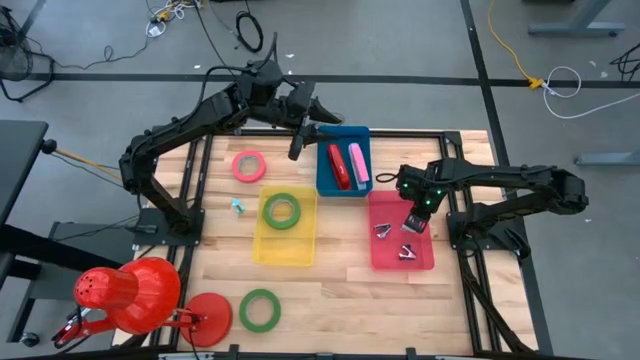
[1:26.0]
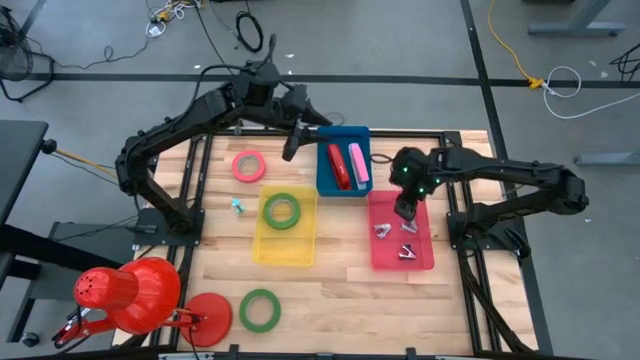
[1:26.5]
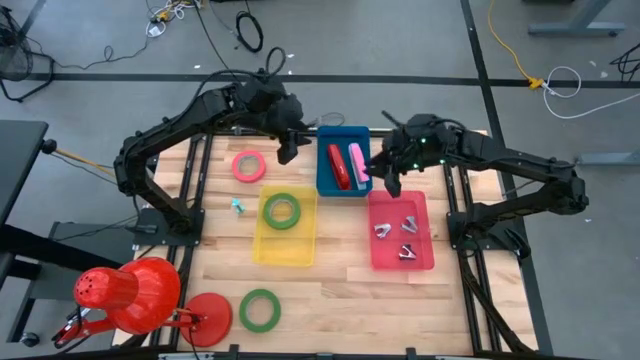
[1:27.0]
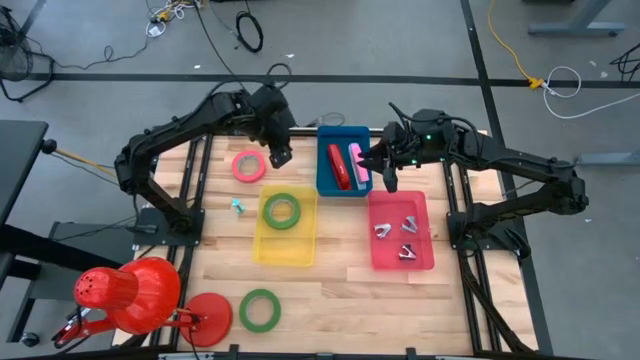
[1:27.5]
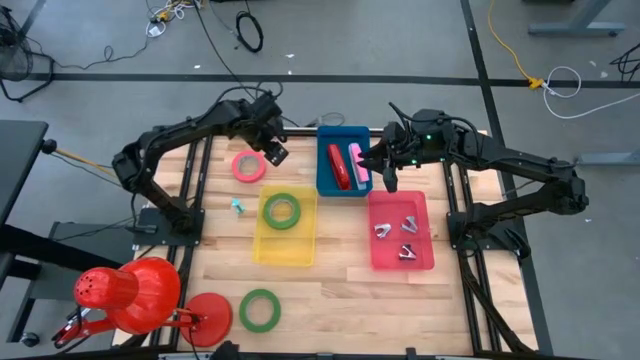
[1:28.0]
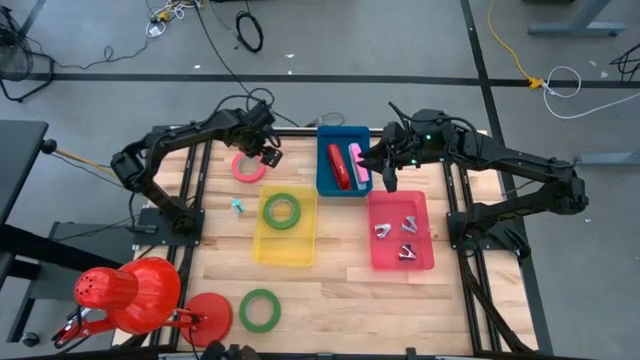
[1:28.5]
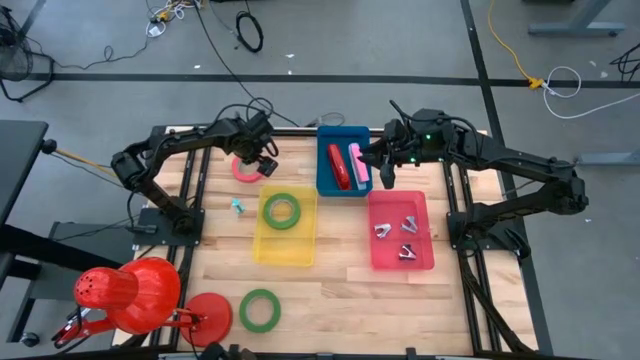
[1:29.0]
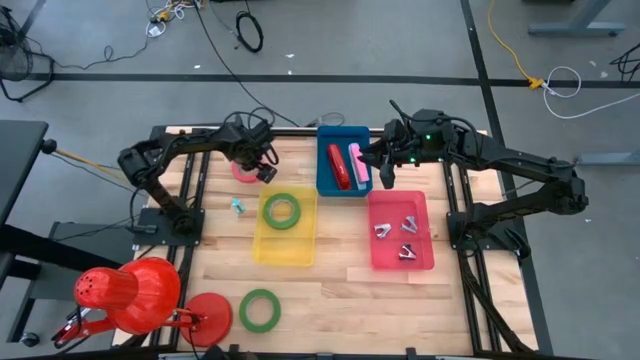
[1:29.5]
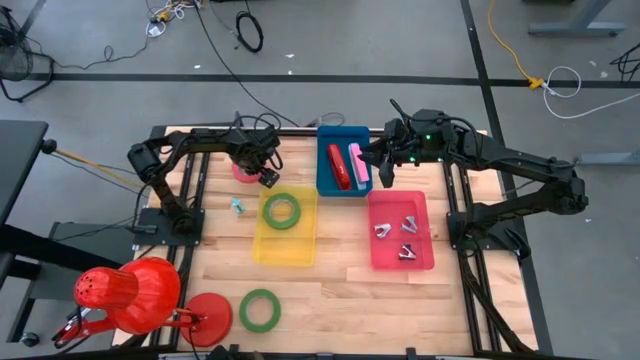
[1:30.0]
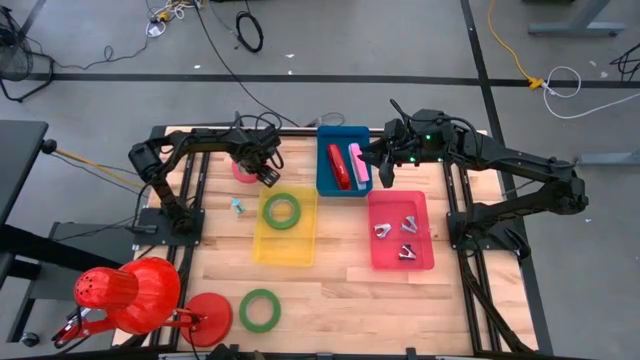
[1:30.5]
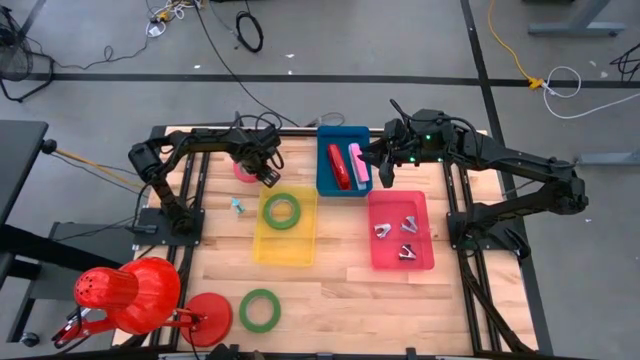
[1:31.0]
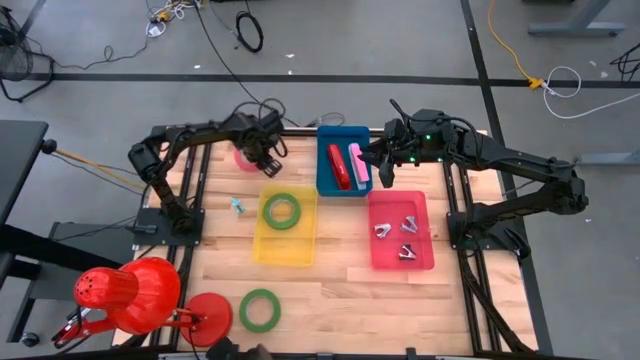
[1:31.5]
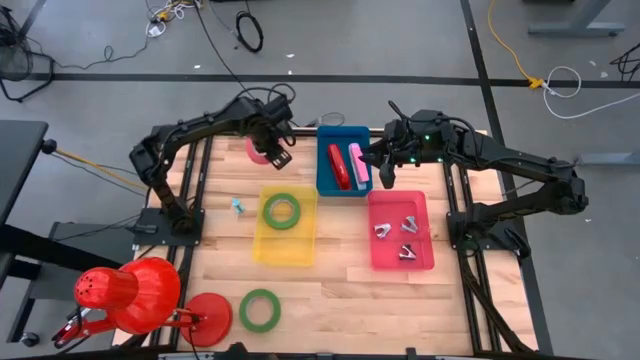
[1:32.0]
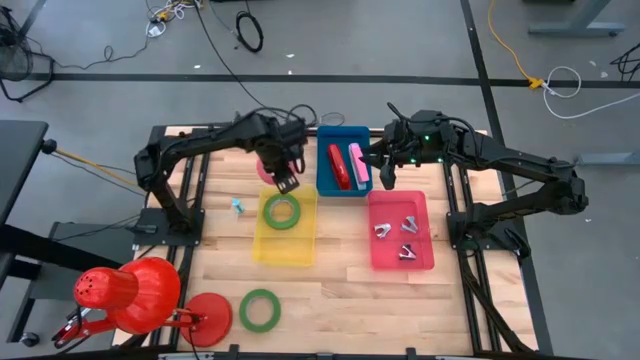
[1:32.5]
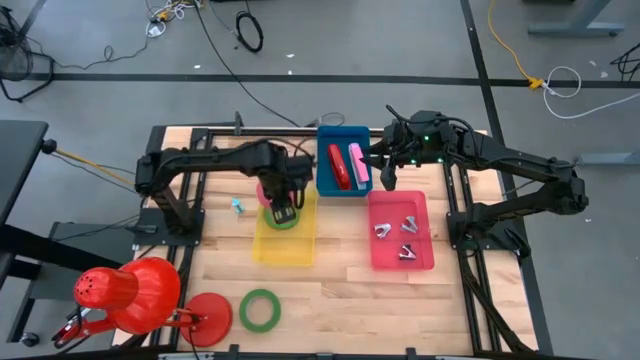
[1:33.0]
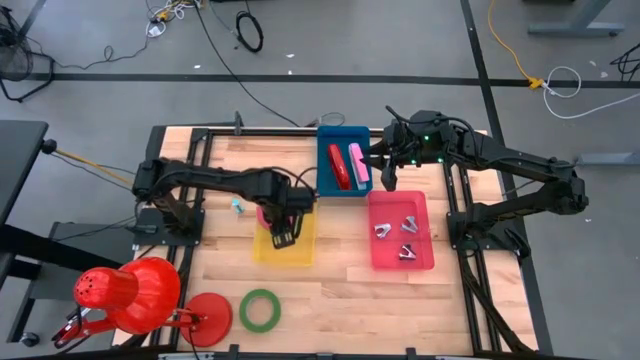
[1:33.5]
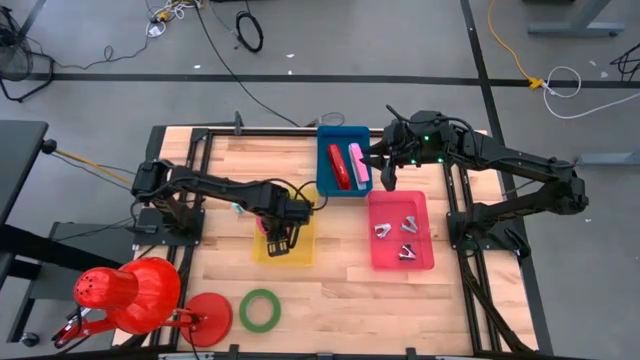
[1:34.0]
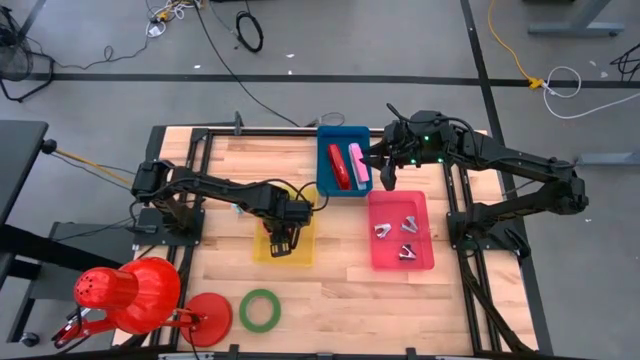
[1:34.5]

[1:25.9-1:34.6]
Task: Pick and place Stapler, Stapler remover, tape
Put the pink tape into the yellow bin

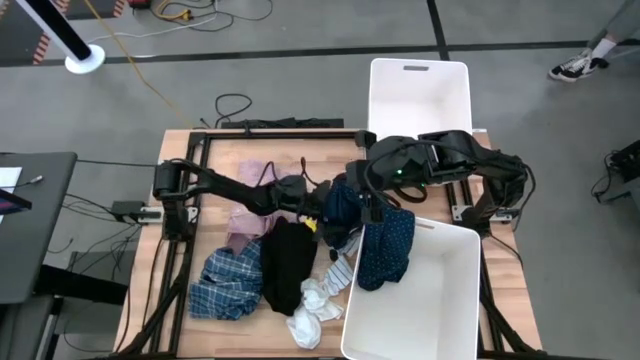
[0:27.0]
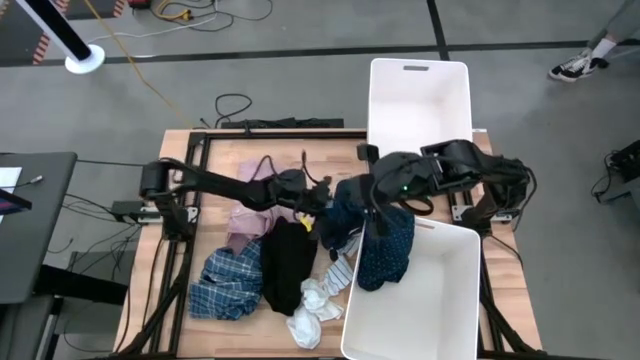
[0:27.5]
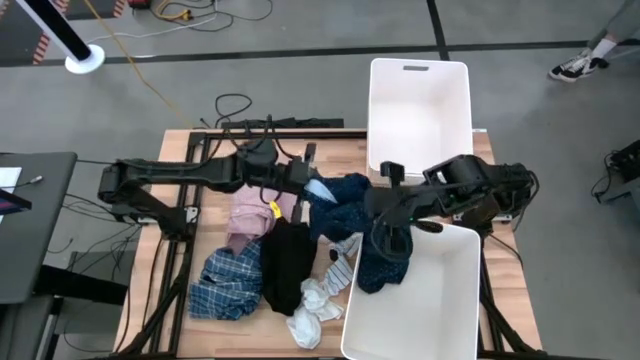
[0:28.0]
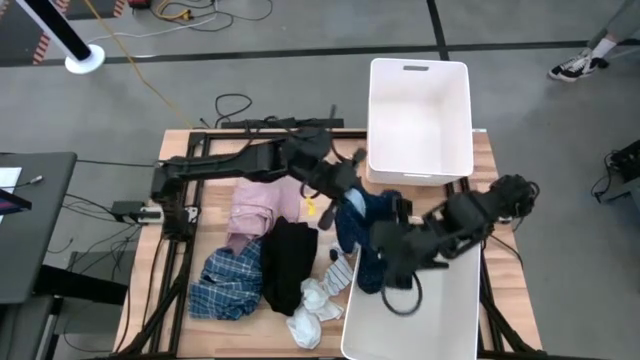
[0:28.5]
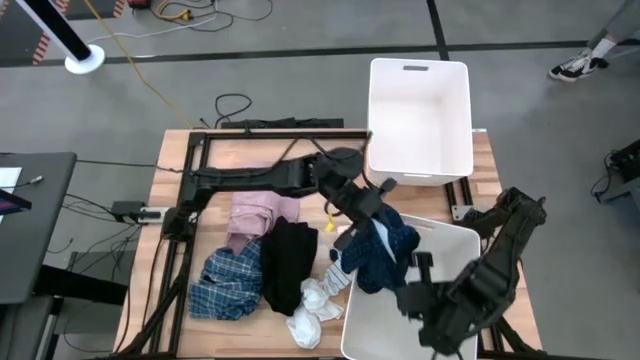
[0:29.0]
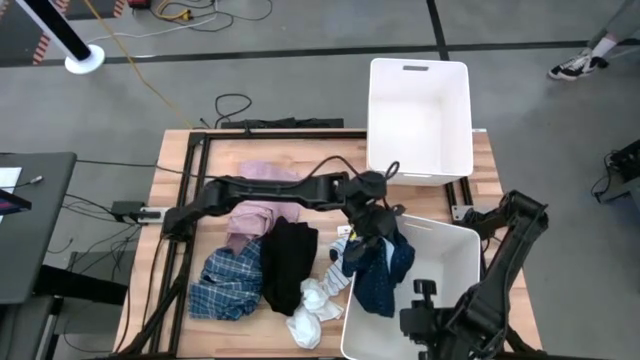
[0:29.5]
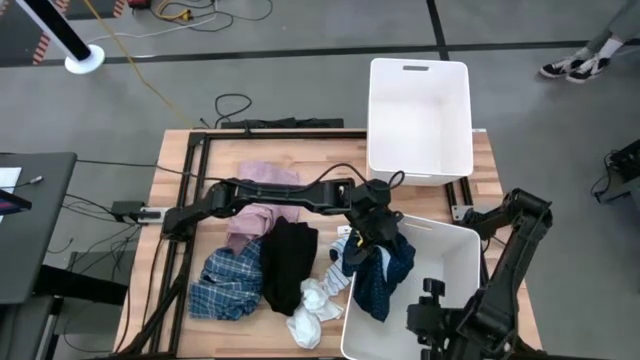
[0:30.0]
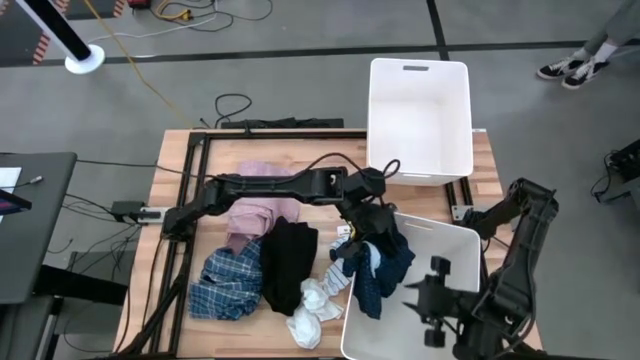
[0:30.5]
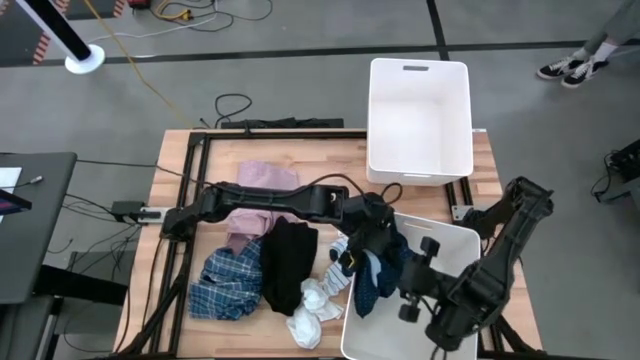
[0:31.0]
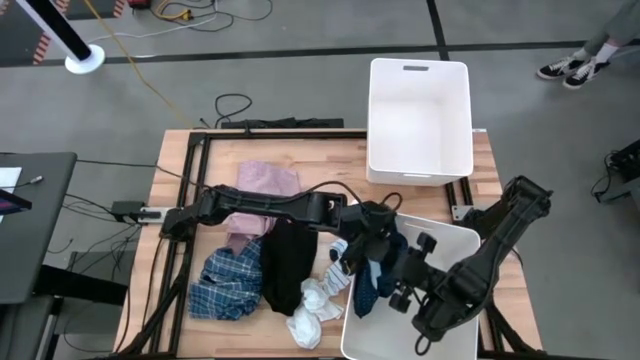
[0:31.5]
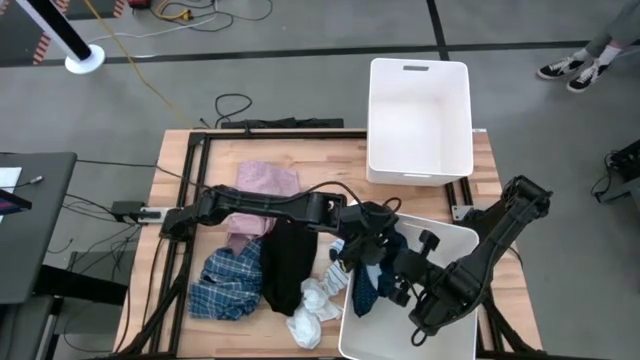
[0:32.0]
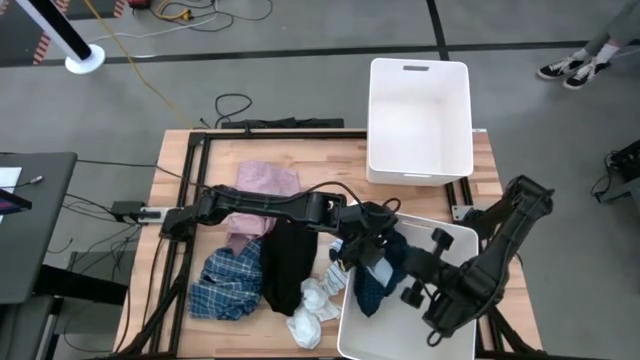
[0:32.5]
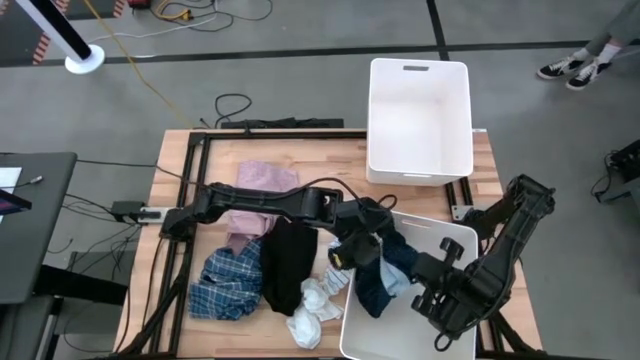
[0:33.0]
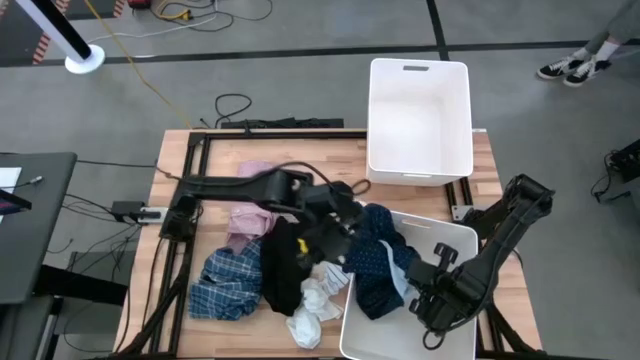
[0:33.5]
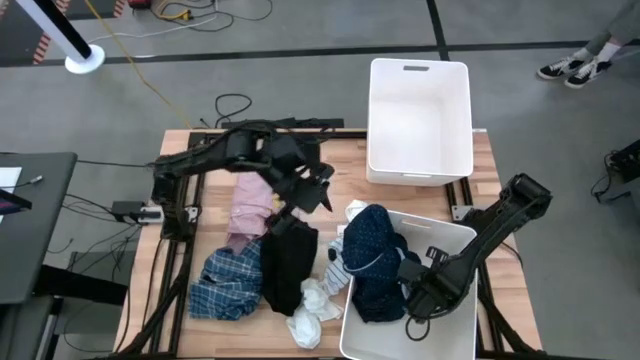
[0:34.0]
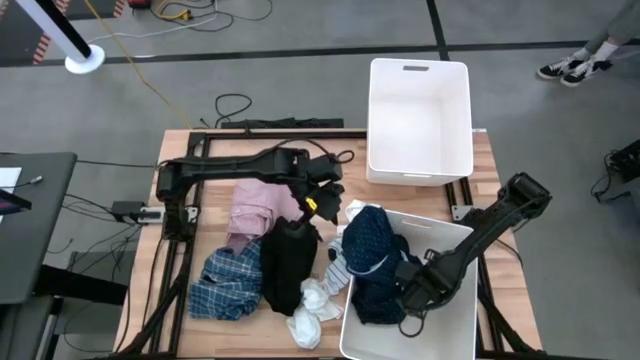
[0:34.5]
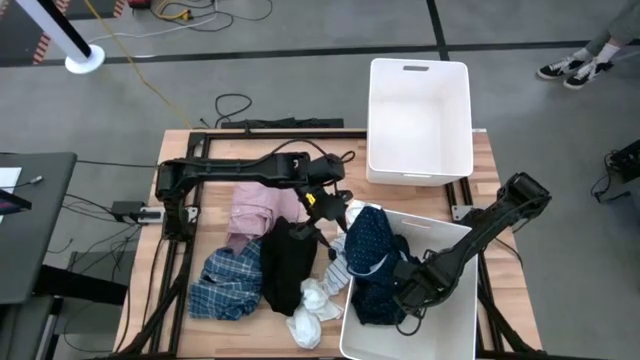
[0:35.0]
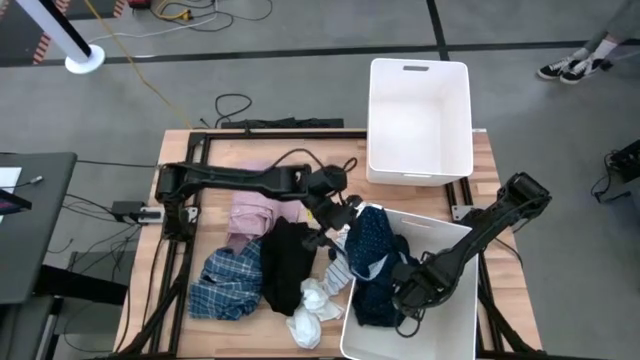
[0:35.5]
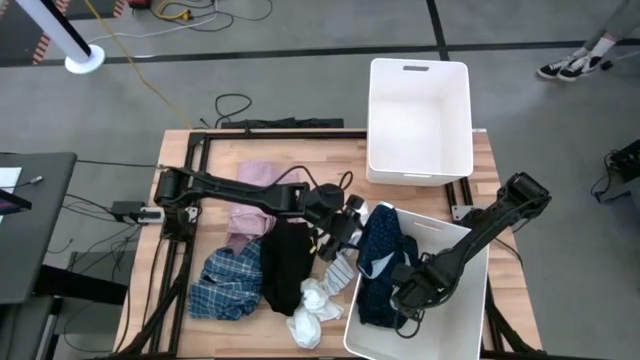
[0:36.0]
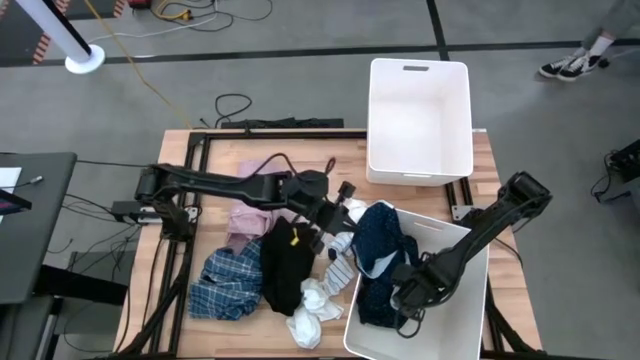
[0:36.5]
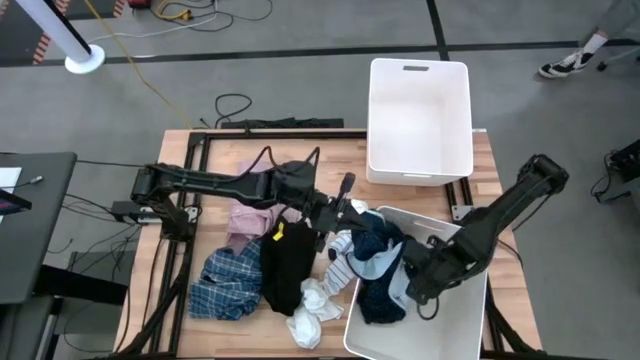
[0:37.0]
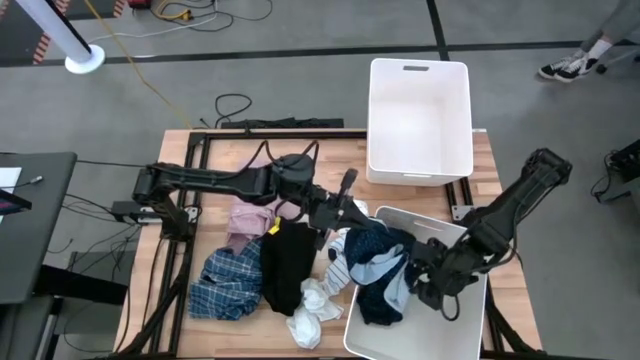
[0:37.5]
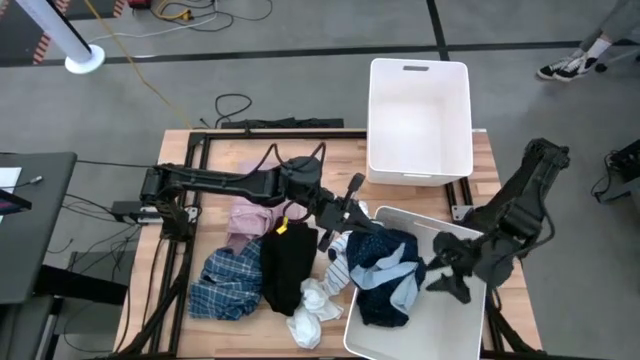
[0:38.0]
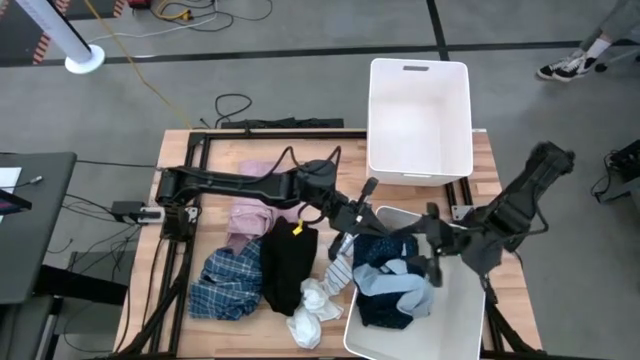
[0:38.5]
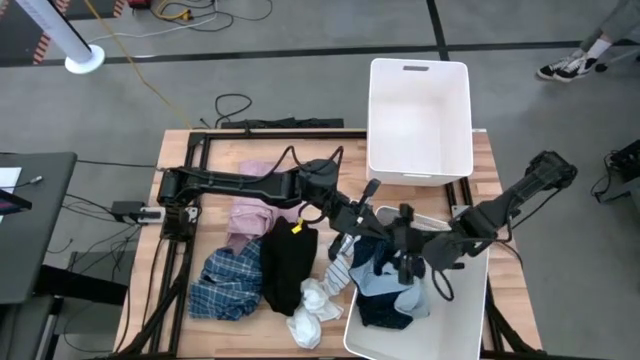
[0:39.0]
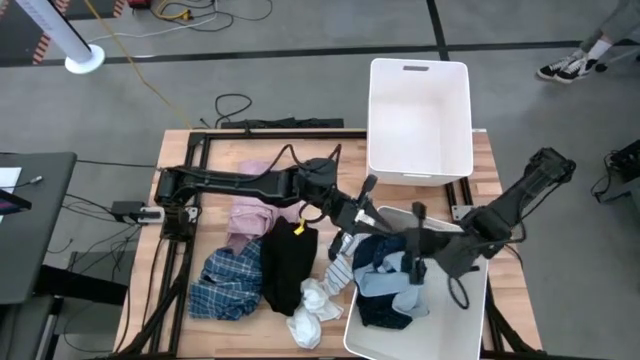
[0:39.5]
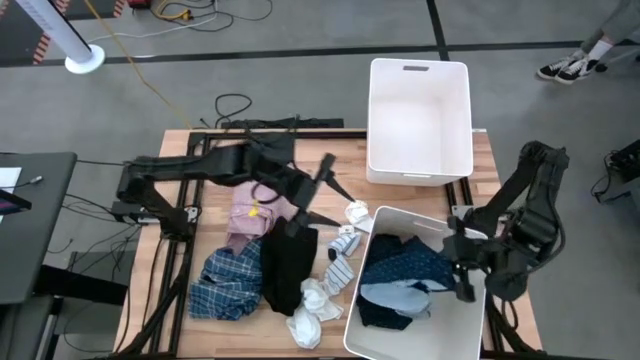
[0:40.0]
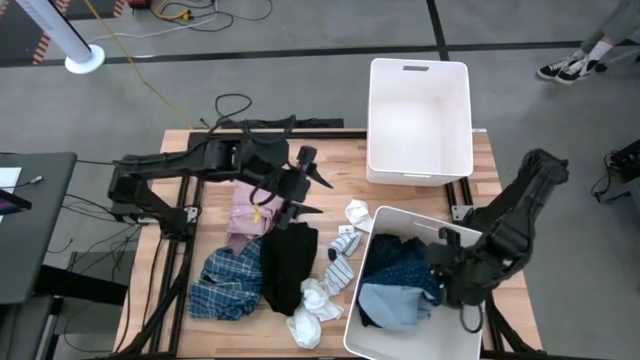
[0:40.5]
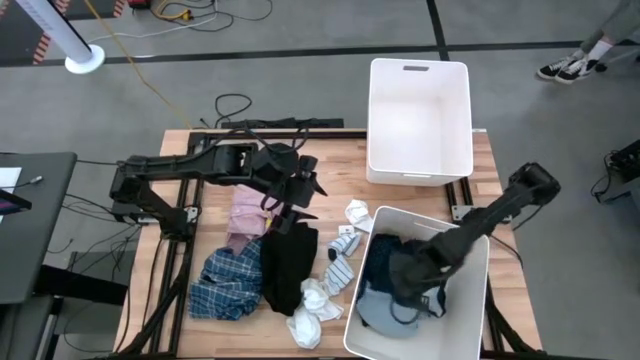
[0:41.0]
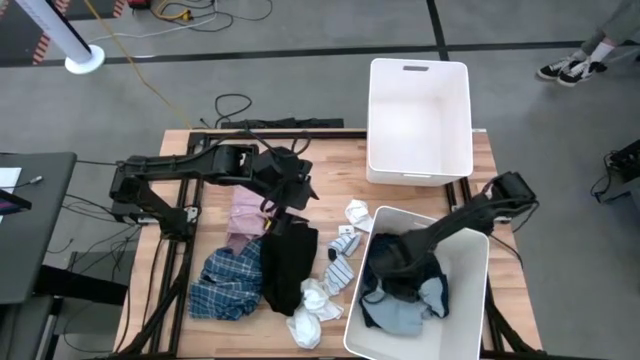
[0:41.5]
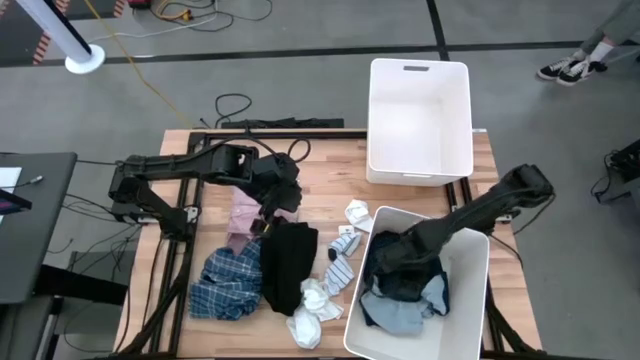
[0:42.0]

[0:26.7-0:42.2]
Task: Sort clothes
Put the top blue patterned polo in the bottom laundry bin
